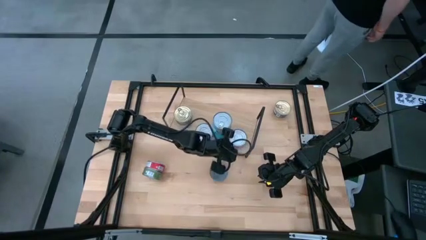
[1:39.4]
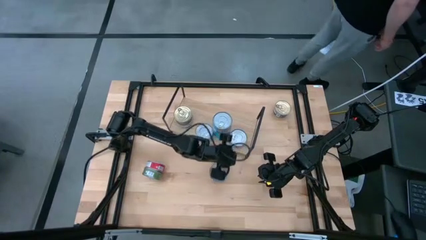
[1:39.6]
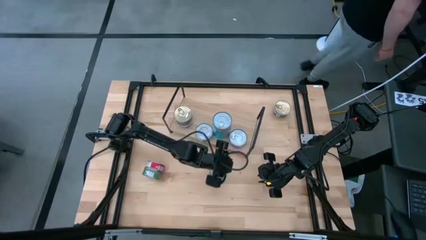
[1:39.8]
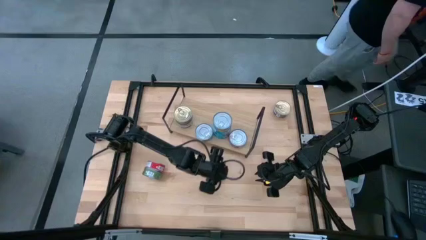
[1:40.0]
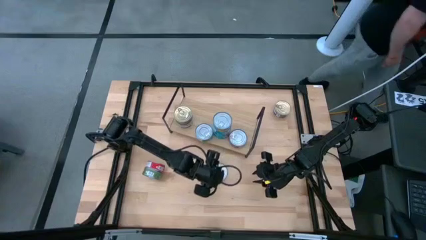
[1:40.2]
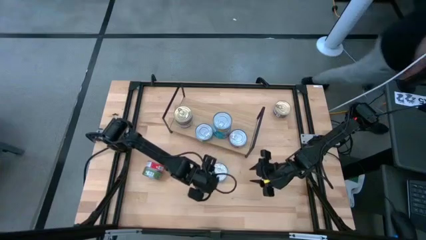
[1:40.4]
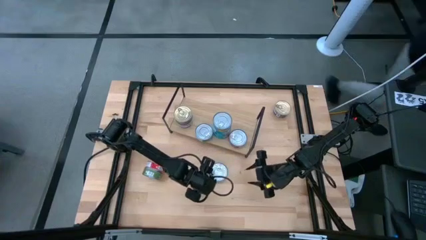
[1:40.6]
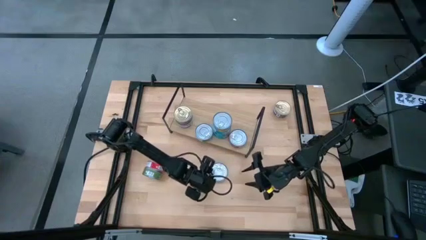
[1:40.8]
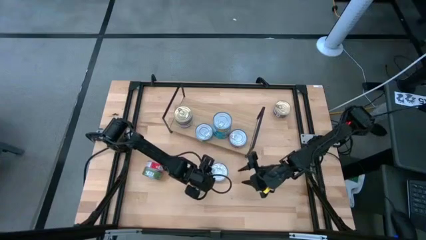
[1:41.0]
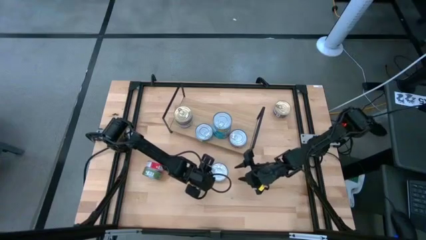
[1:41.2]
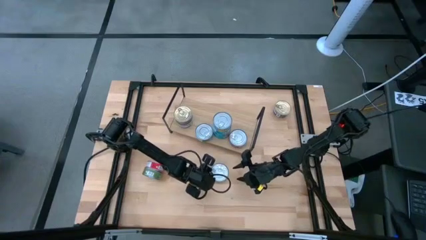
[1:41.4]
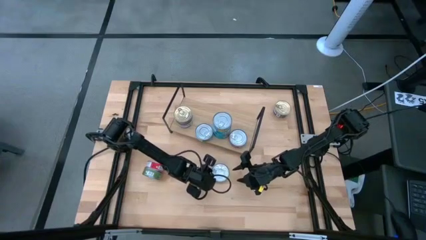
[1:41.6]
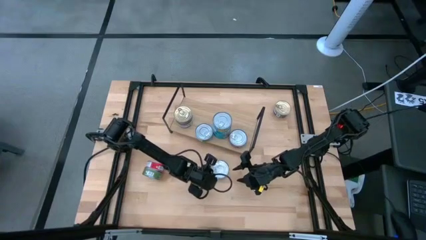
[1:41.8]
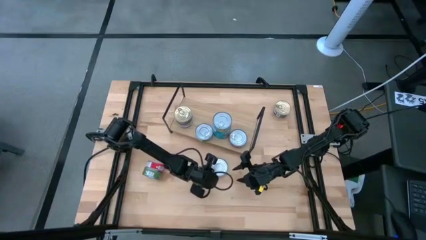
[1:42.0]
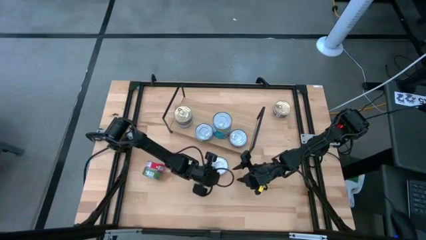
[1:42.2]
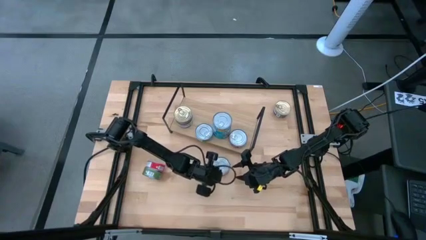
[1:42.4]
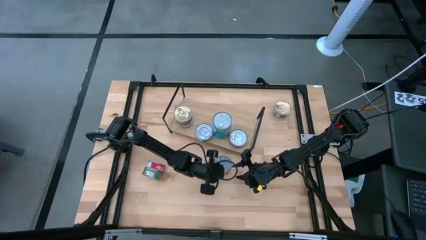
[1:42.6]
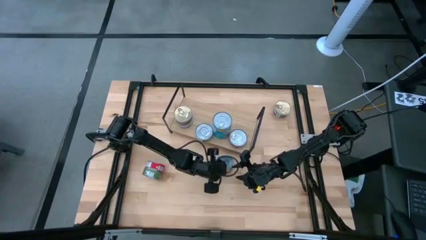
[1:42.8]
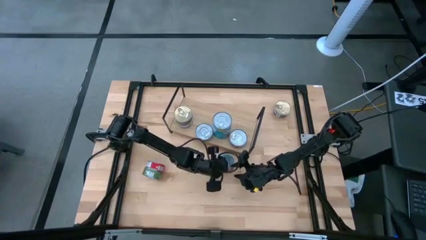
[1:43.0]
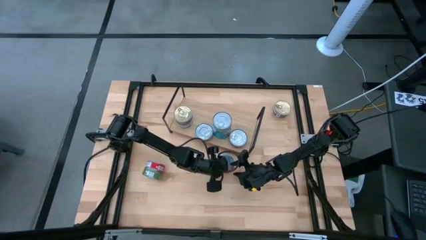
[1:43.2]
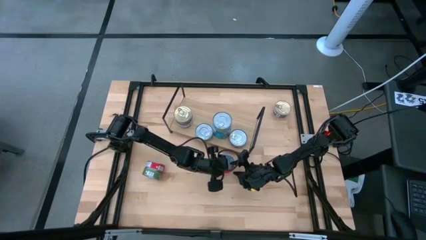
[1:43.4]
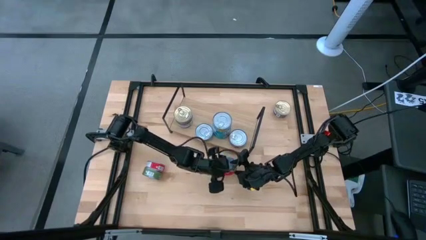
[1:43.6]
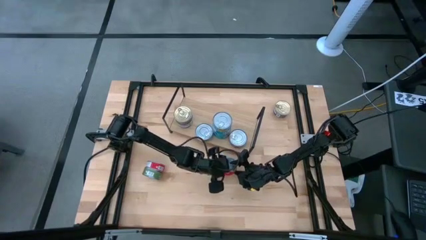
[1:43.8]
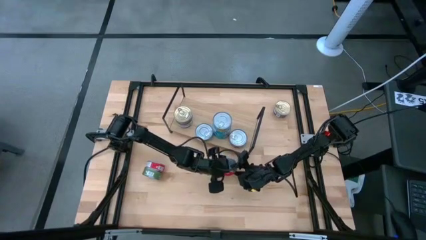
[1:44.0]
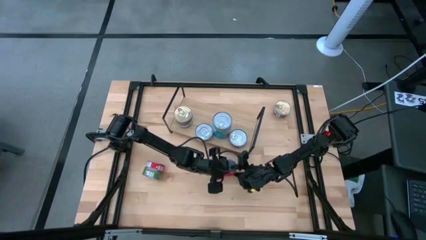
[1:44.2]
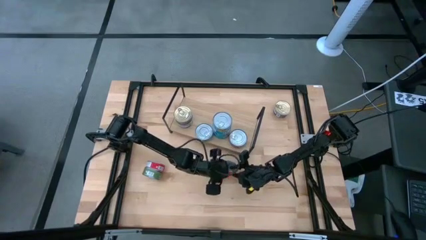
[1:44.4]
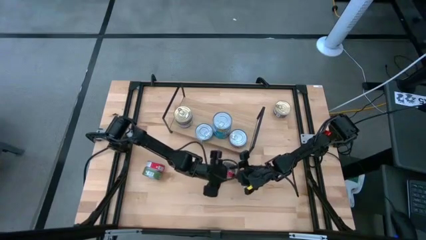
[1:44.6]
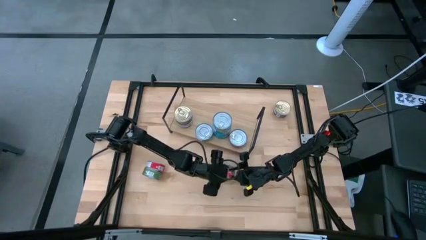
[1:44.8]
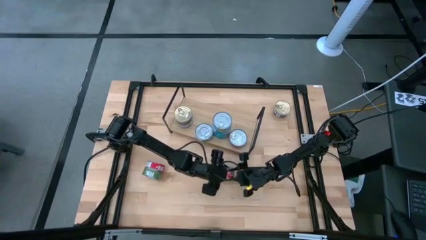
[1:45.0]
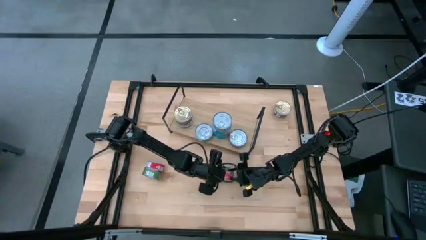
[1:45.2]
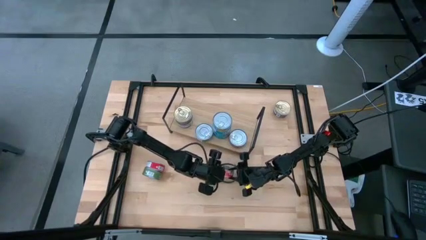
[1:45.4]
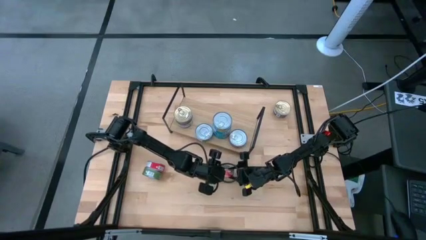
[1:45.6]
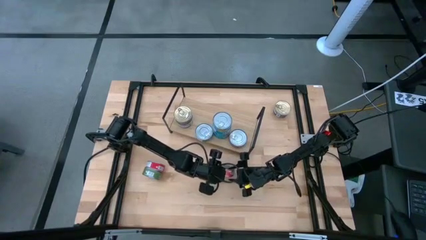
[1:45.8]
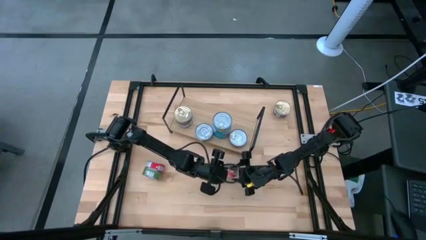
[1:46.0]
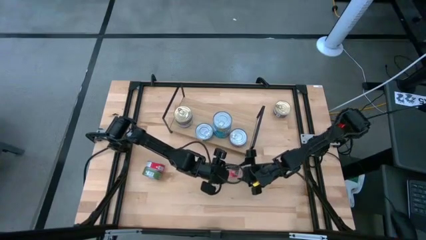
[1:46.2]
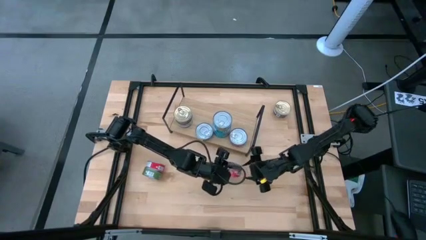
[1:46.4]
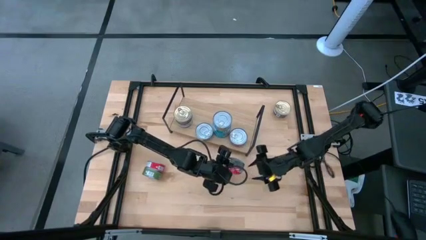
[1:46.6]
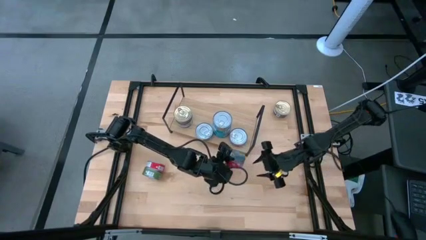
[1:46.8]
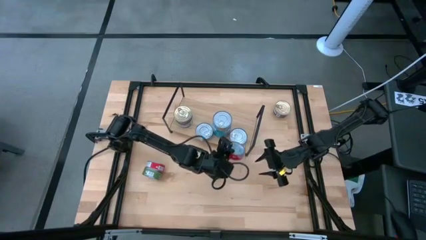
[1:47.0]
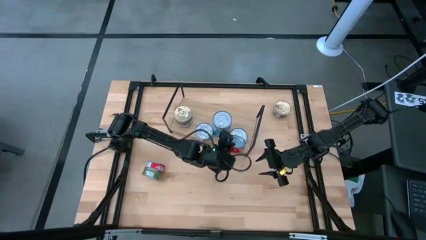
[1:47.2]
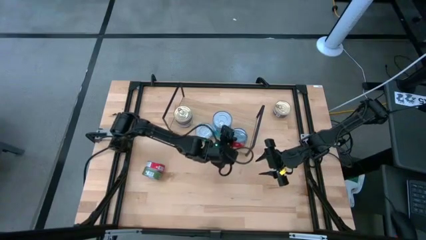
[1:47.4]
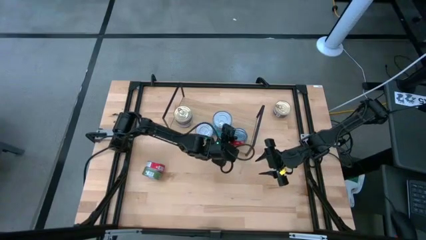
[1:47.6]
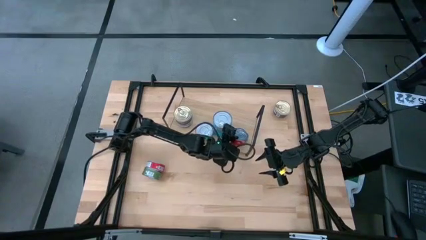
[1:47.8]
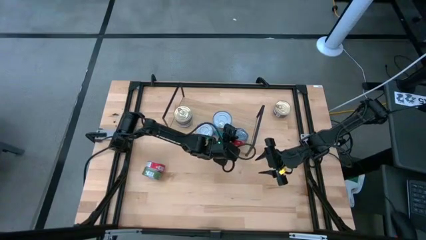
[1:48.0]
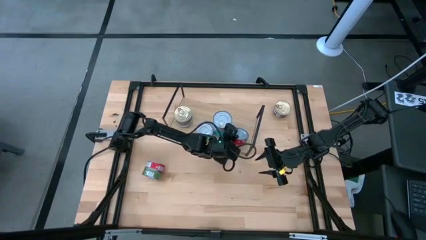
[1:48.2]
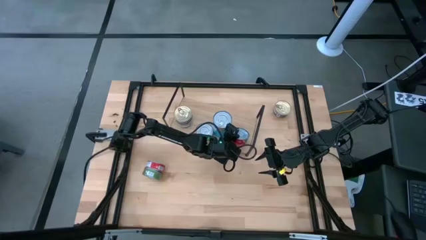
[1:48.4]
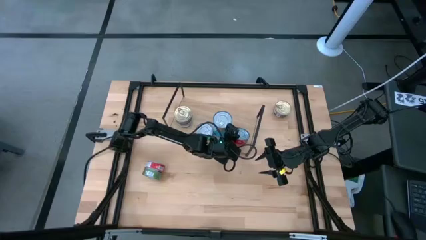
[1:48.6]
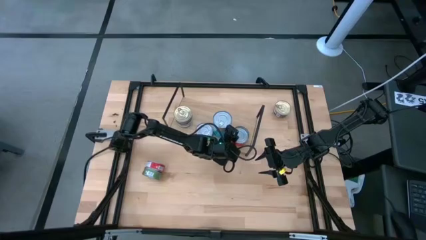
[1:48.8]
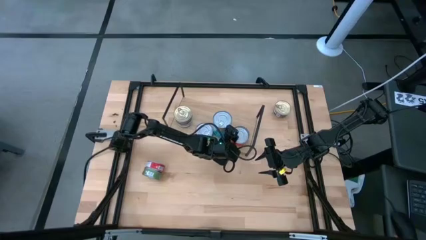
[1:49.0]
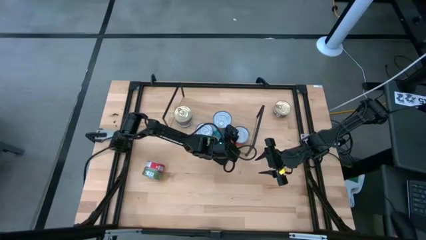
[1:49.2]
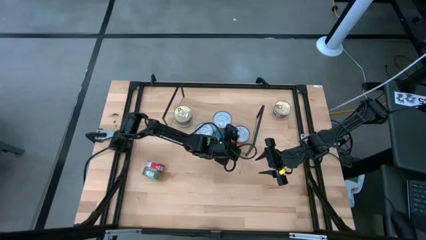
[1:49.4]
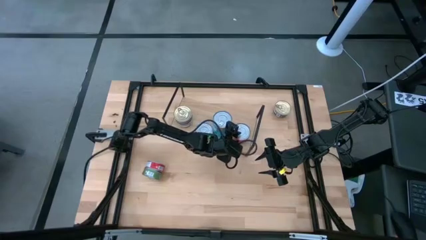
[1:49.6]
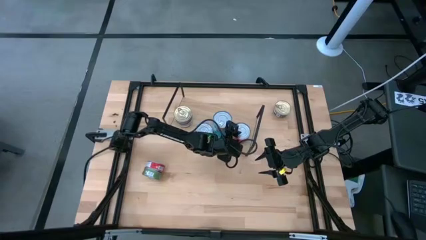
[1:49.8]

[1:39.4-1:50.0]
Task: Stack canned seafood by type on shelf
Stack the red tuna can on top of the red tuna can on the shelf

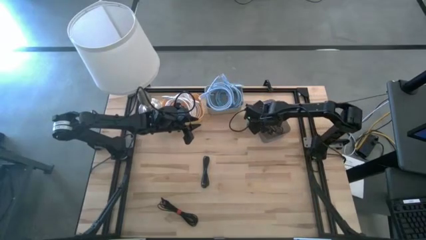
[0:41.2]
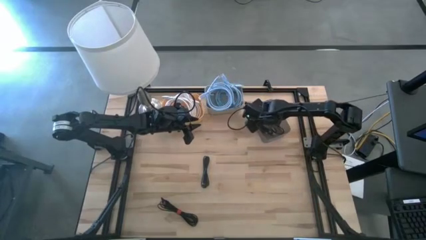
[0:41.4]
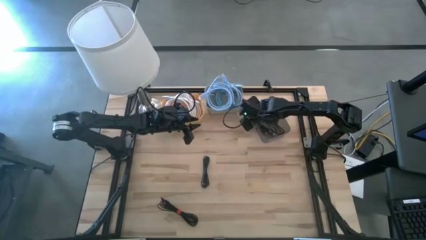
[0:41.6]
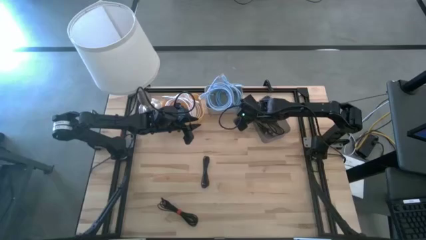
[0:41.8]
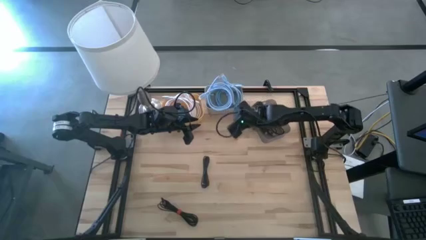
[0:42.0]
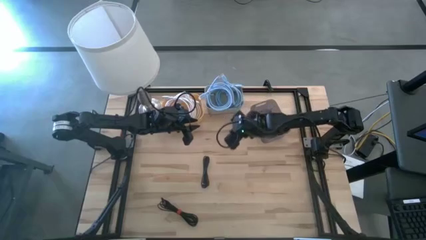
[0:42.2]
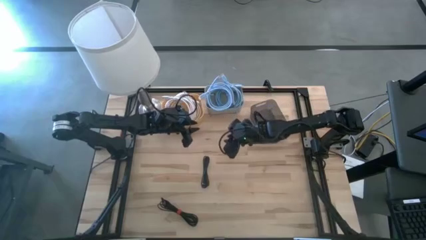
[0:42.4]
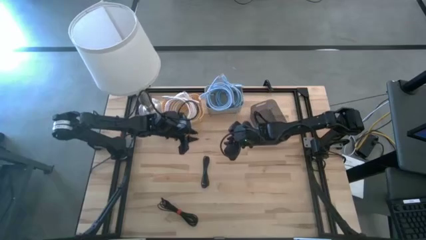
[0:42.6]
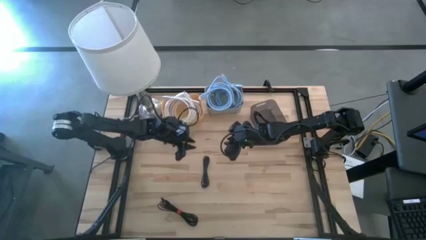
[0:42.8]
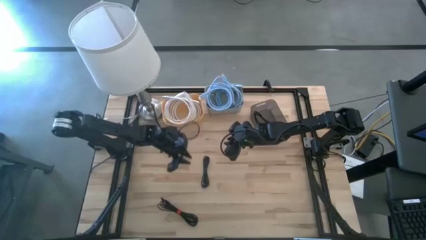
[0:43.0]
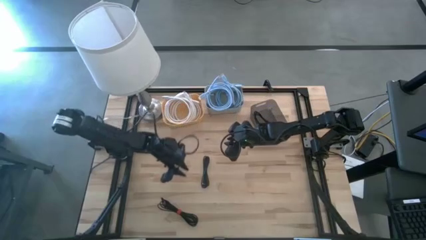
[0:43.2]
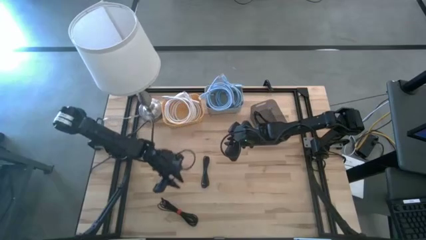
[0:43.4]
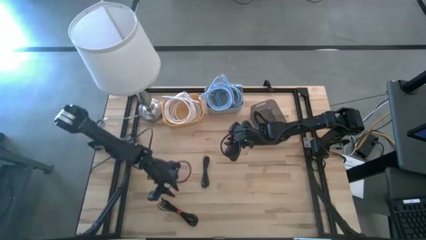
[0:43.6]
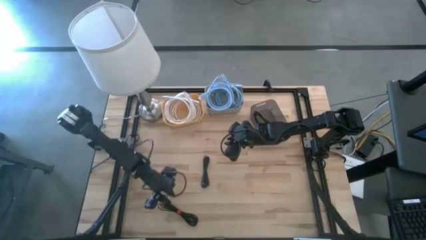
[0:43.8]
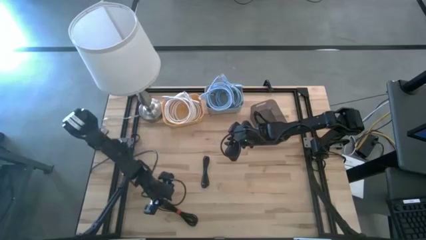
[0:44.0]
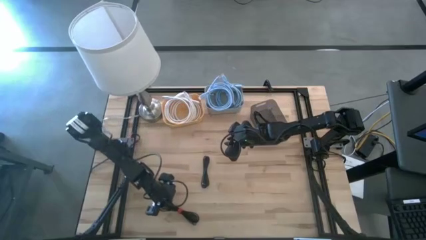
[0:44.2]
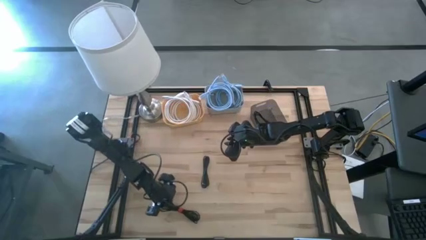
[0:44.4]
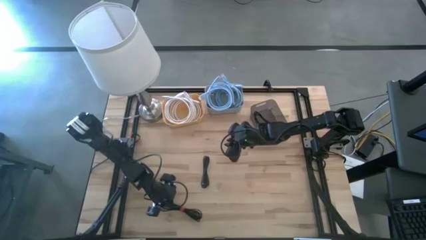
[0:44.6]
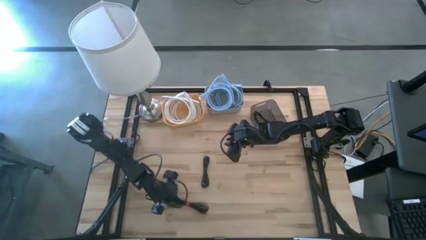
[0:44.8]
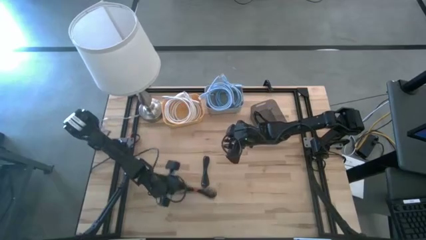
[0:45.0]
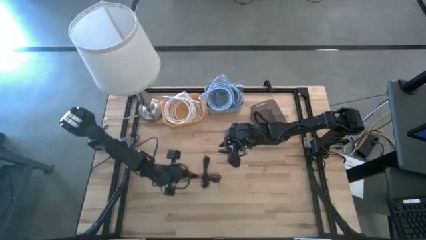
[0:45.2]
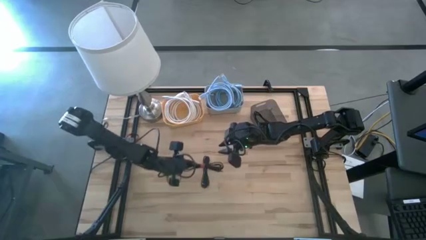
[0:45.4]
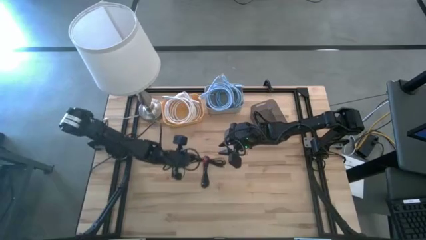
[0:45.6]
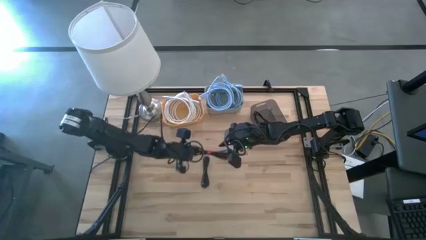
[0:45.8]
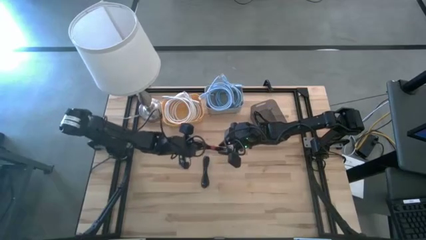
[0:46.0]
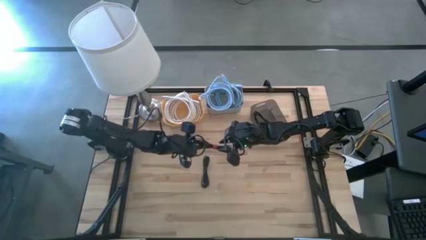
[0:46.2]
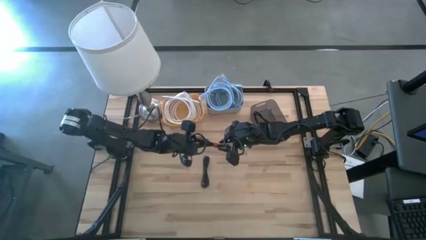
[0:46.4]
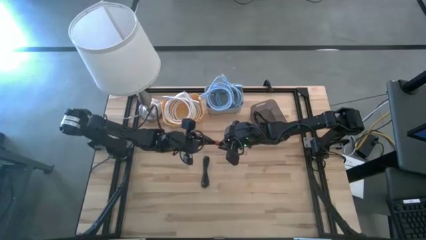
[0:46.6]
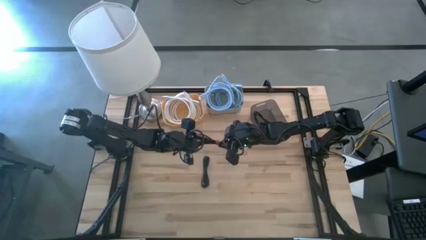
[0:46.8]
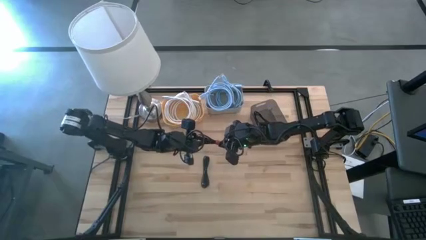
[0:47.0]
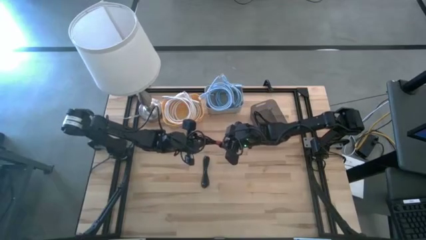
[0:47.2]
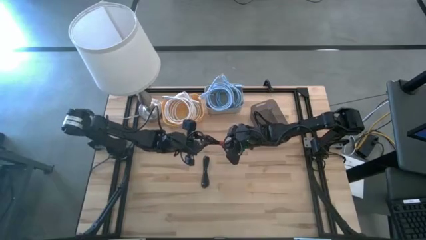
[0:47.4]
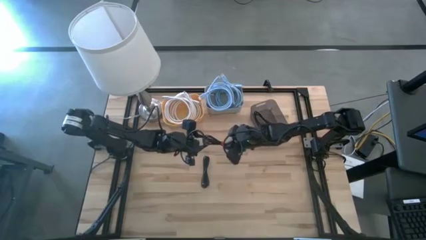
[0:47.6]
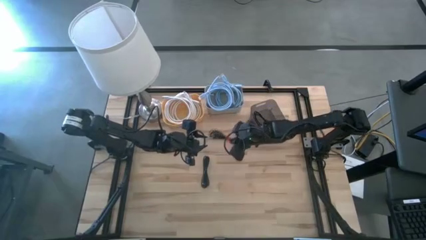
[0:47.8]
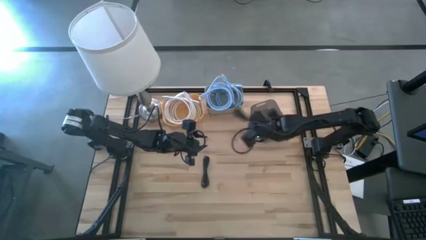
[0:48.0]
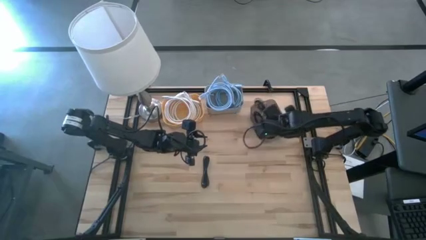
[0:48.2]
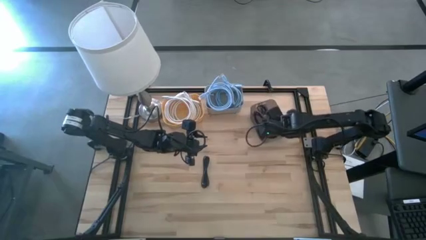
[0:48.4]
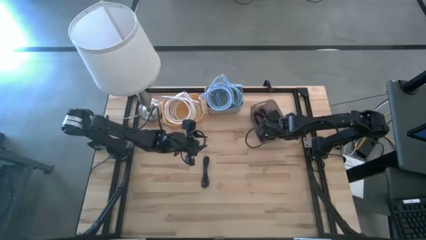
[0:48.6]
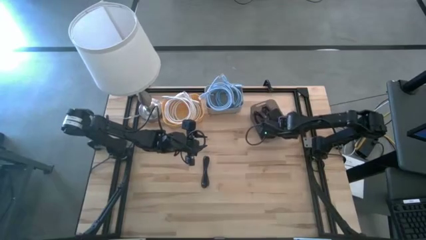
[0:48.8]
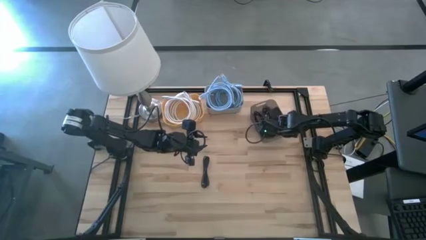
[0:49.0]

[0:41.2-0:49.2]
Task: Pick & Place USB Port
Put the bottom black charger cable into the black bin
